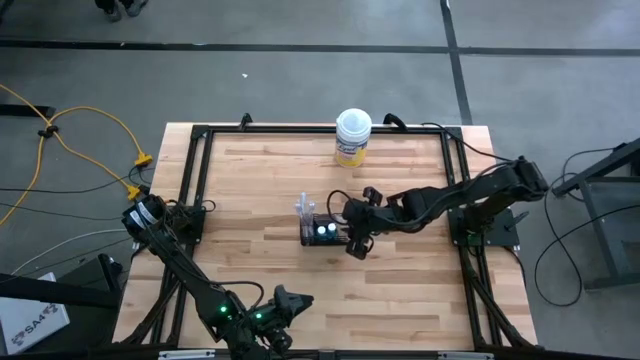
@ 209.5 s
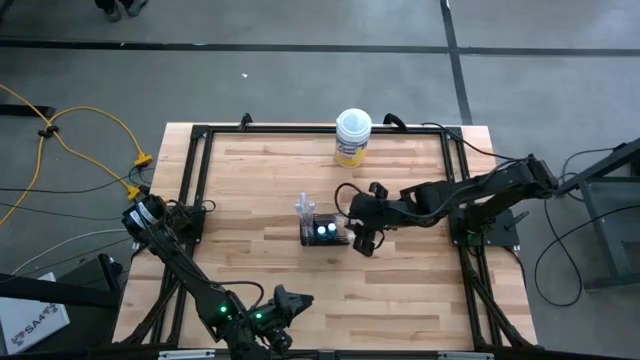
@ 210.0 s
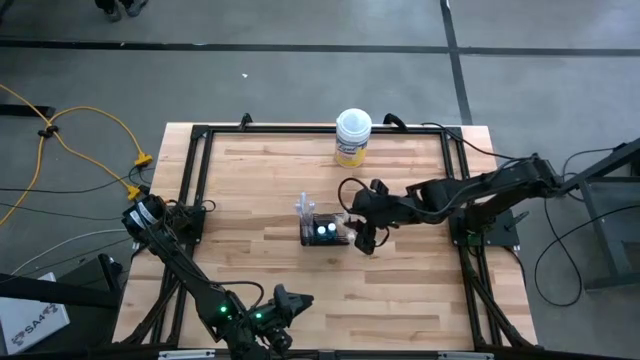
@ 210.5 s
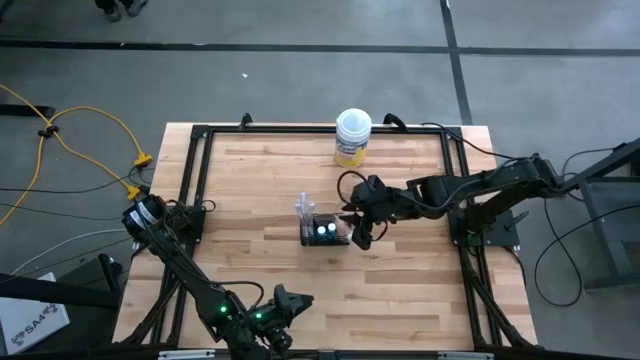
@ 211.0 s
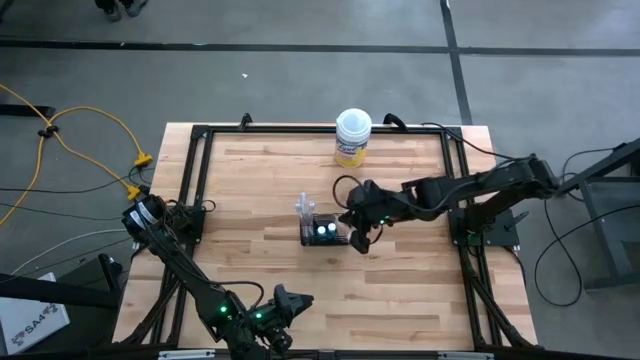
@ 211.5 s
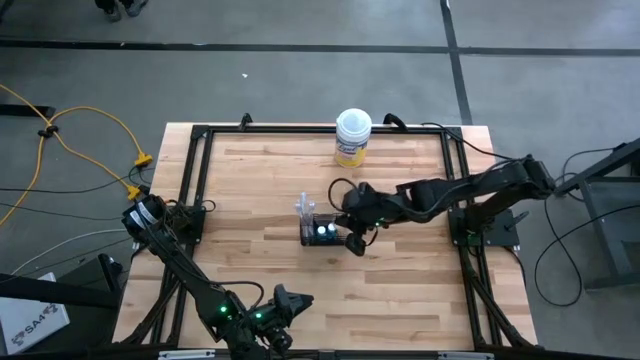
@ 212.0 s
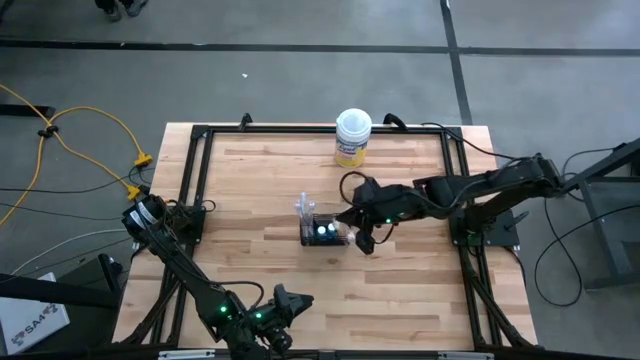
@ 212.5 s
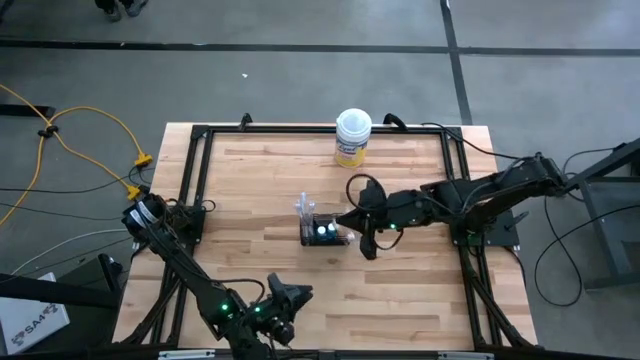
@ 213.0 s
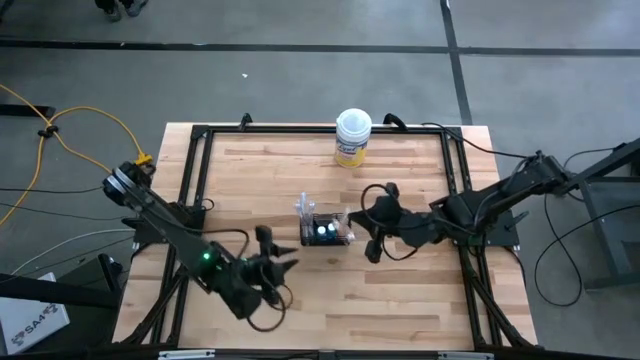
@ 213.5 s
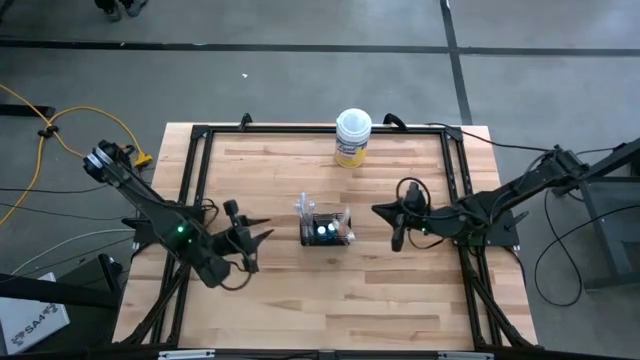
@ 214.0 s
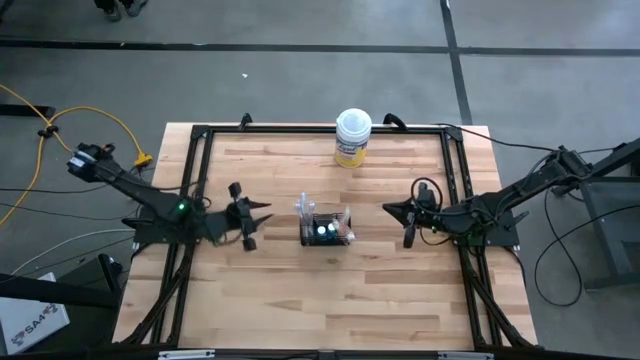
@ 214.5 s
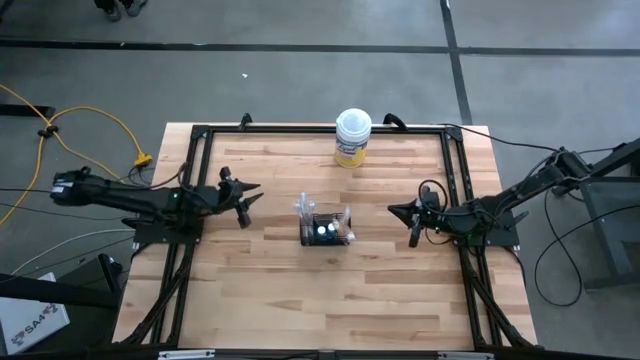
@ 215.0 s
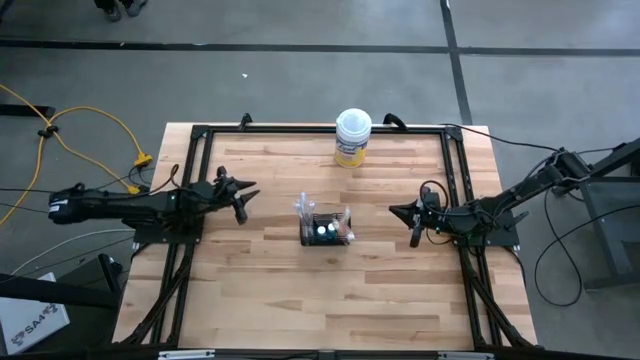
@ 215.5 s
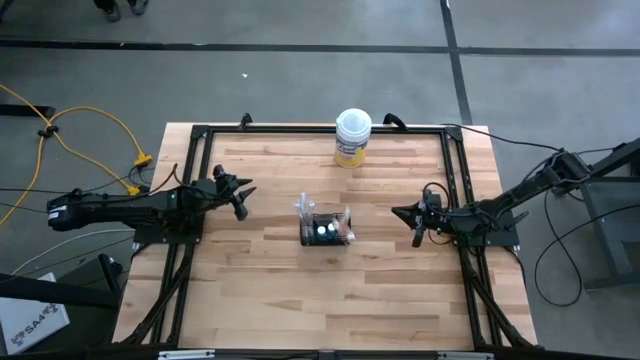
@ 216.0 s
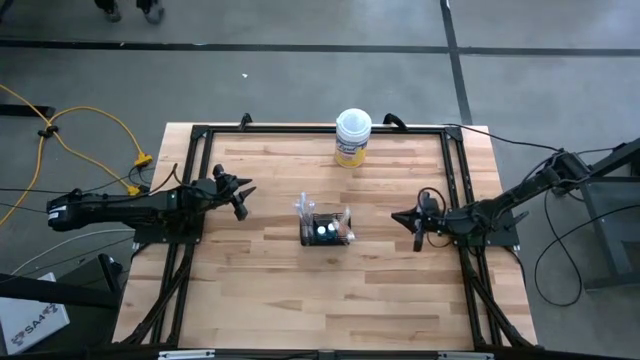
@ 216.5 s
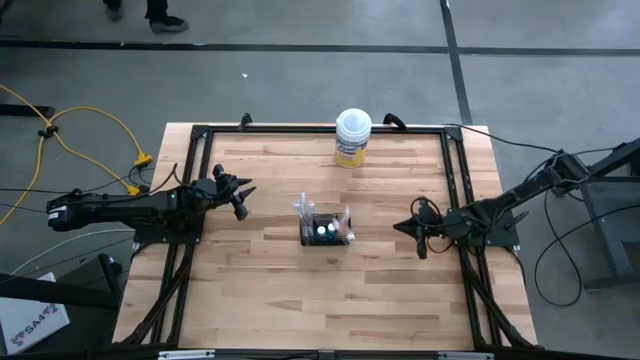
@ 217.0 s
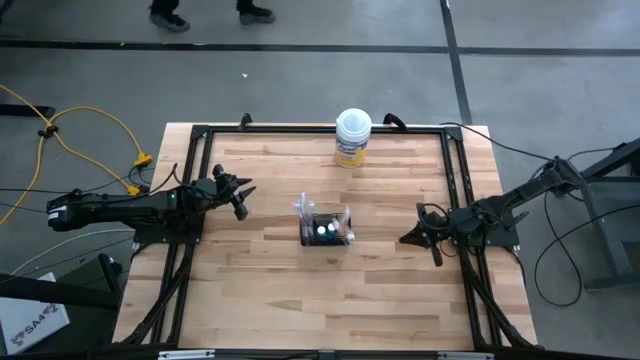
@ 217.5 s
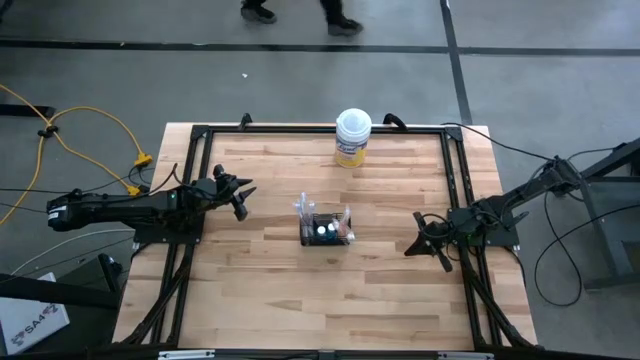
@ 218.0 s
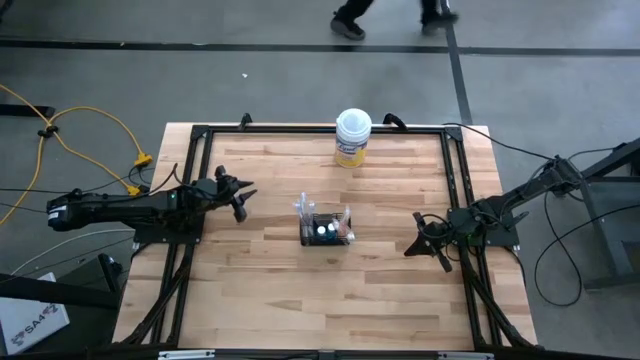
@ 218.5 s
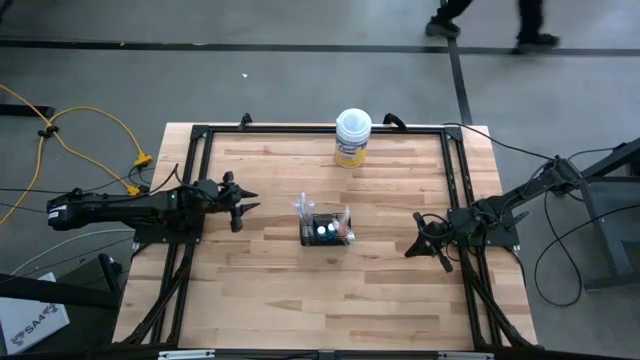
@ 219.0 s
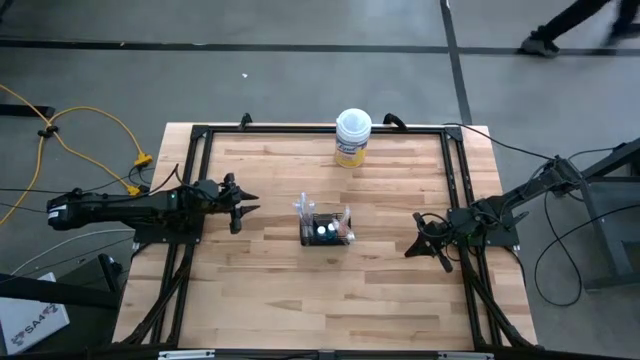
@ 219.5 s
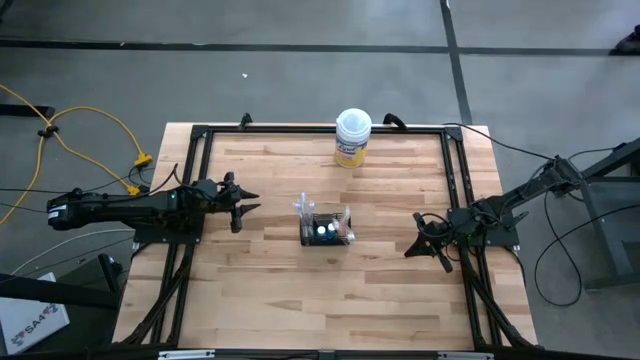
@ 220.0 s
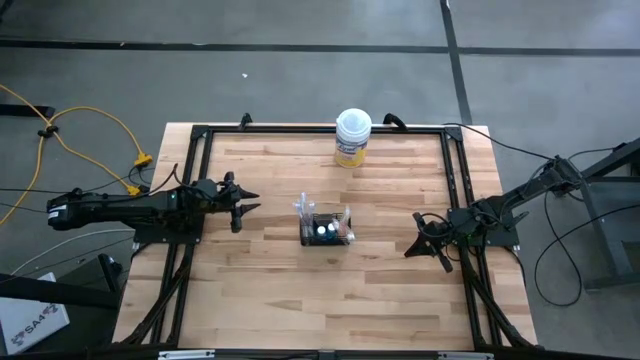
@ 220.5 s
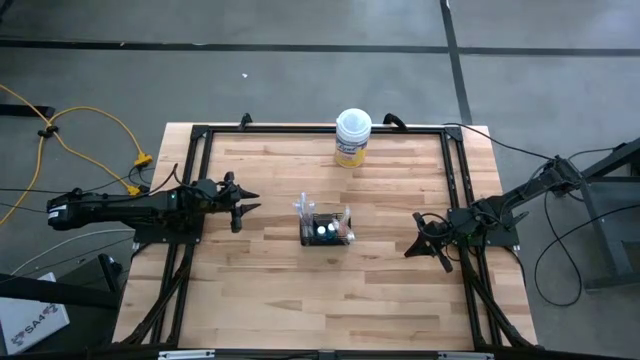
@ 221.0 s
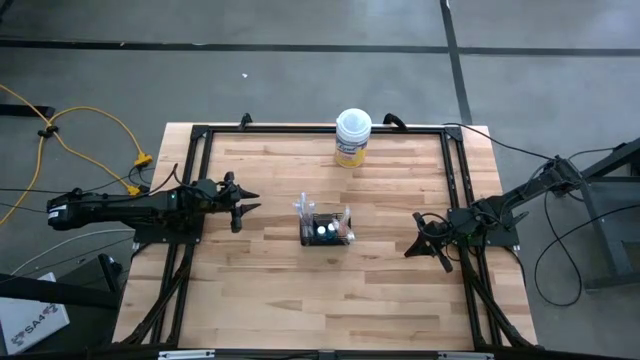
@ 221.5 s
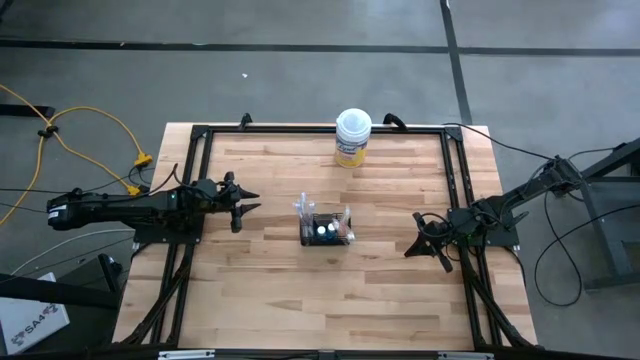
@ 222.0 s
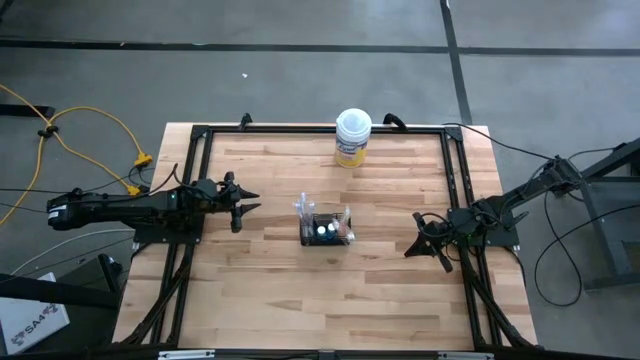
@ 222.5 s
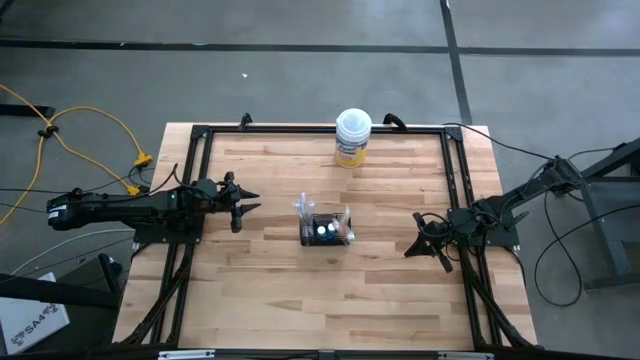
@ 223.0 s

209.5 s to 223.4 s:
Task: Pick & Place toothbrushing station
Return to Home Position

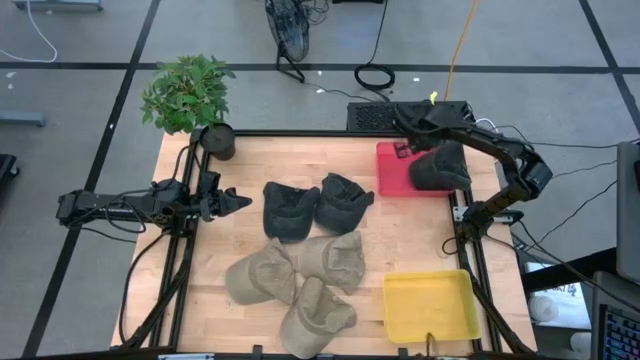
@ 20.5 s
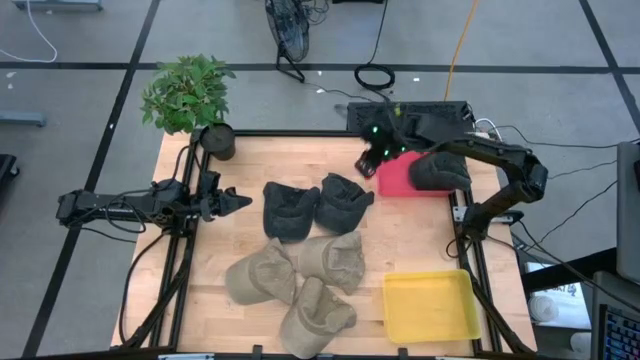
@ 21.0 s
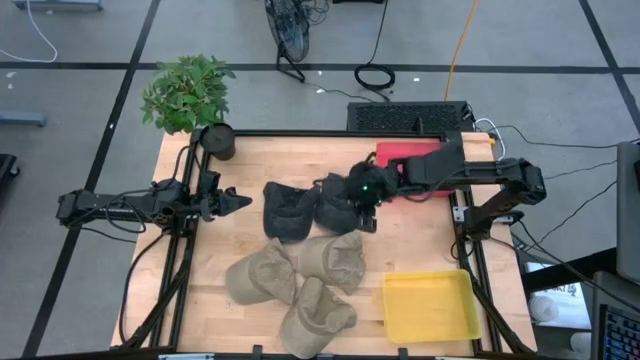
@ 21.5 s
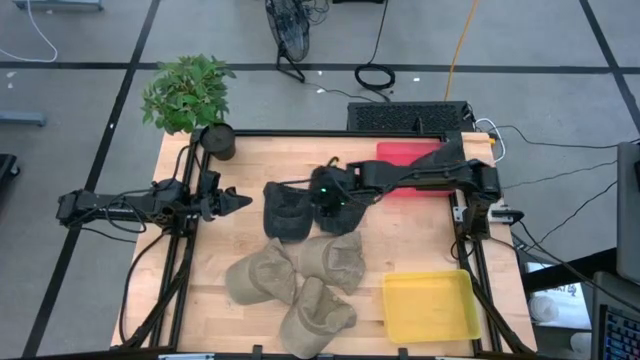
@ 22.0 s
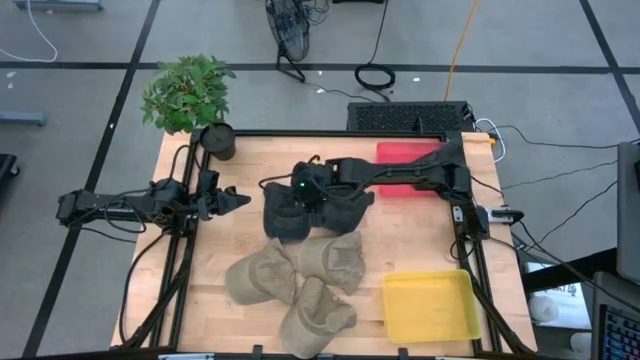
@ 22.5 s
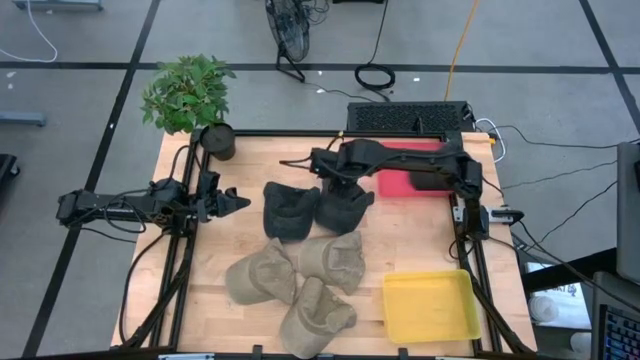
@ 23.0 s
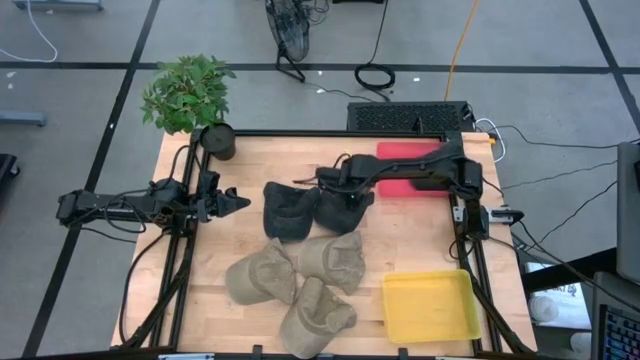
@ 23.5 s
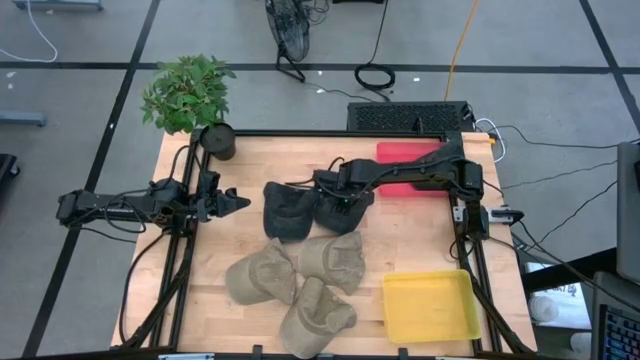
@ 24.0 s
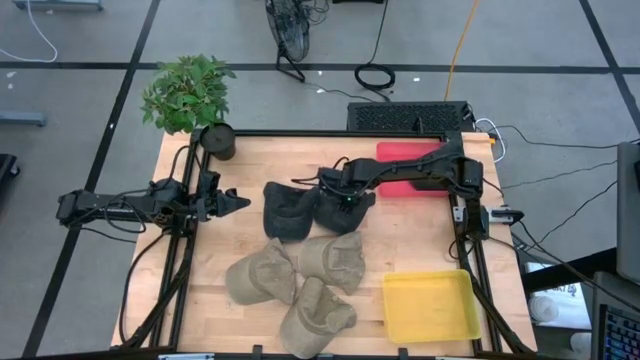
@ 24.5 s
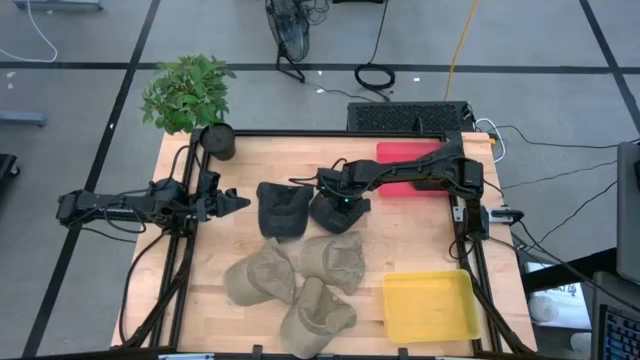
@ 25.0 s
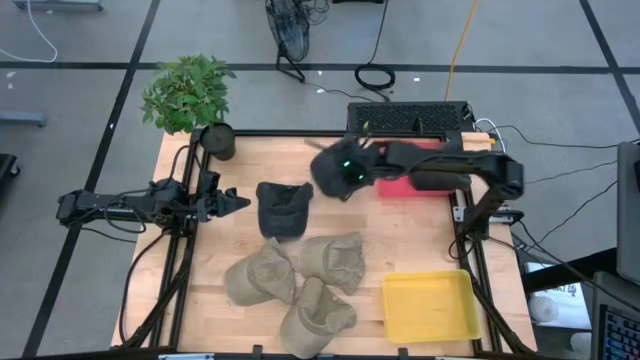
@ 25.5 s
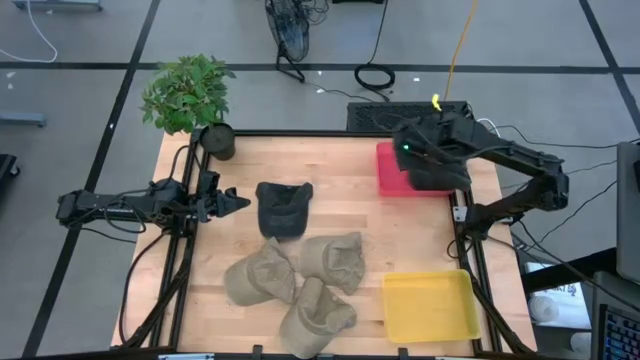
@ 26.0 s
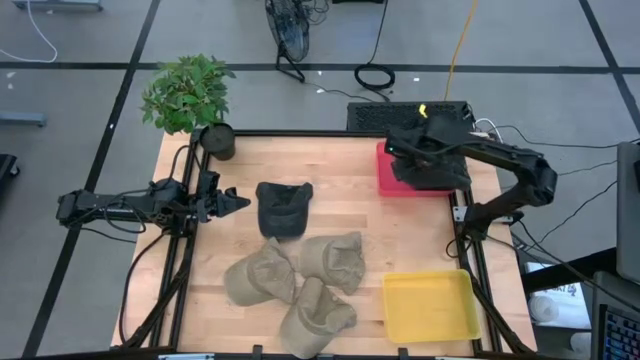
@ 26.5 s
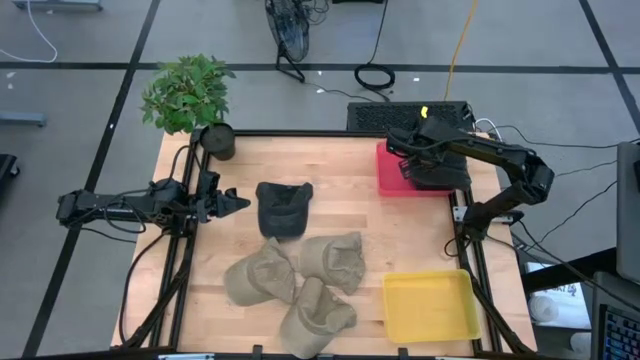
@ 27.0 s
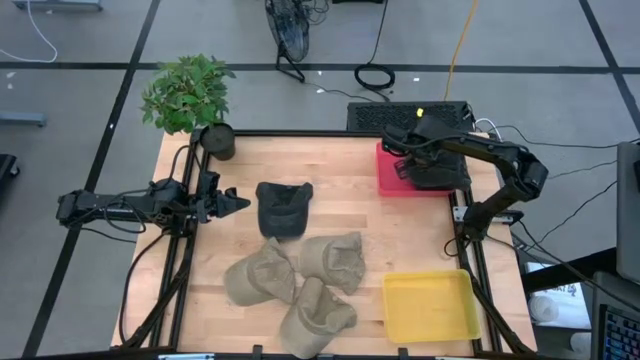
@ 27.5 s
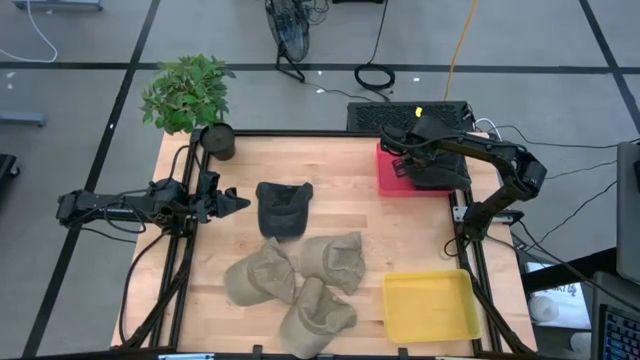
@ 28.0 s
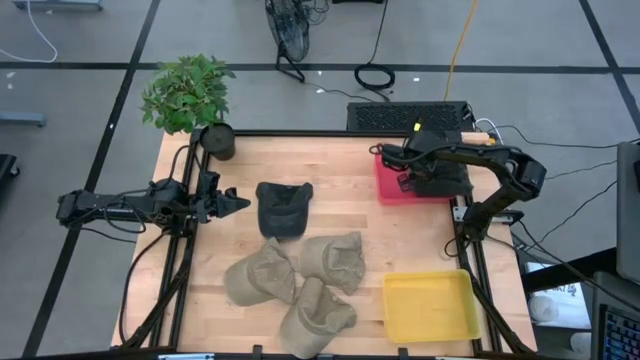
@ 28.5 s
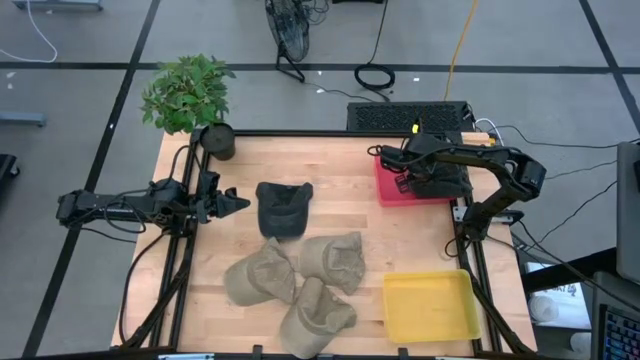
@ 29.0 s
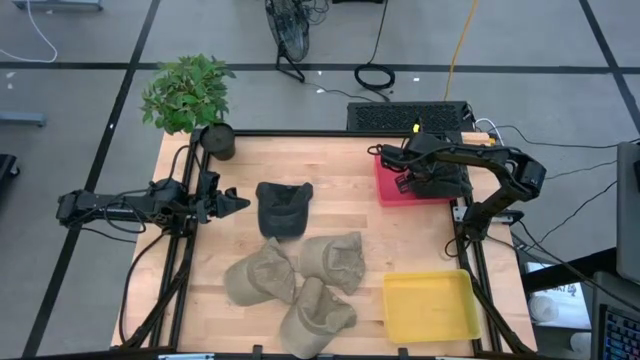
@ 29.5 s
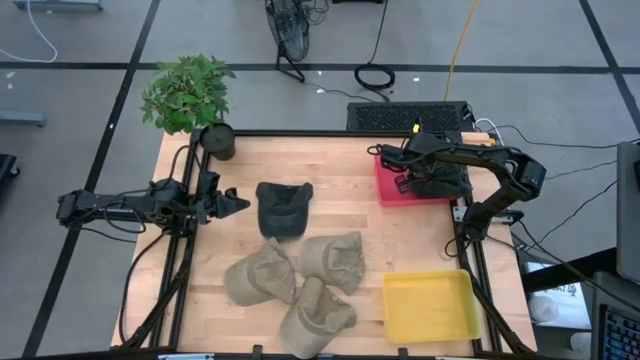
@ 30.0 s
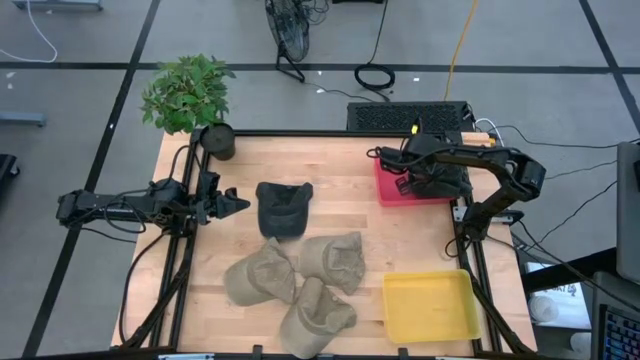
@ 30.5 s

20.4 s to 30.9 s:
Task: Pick & Place hat
Put the right black cap into the red bin
